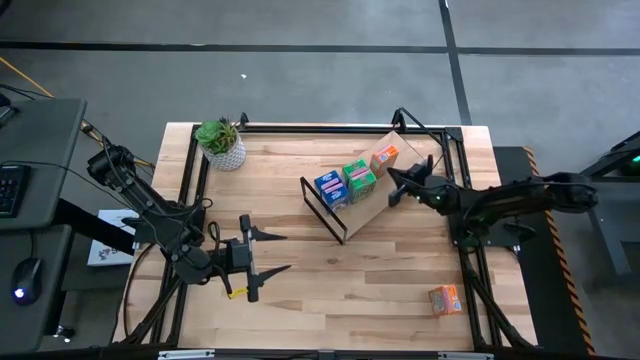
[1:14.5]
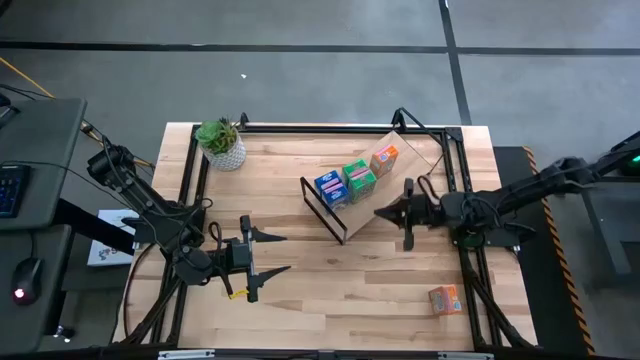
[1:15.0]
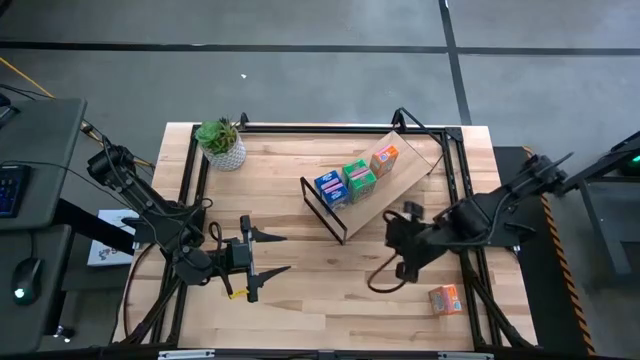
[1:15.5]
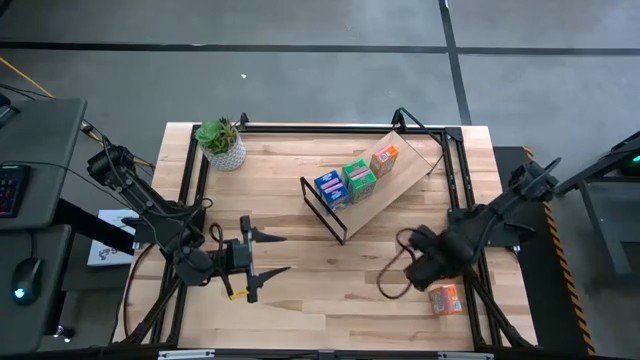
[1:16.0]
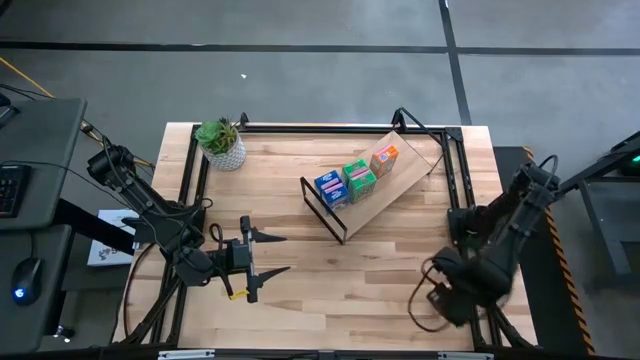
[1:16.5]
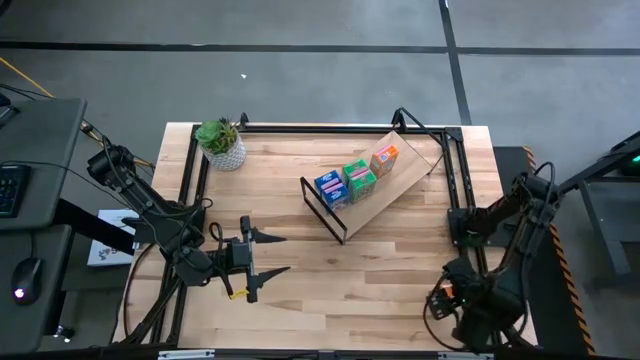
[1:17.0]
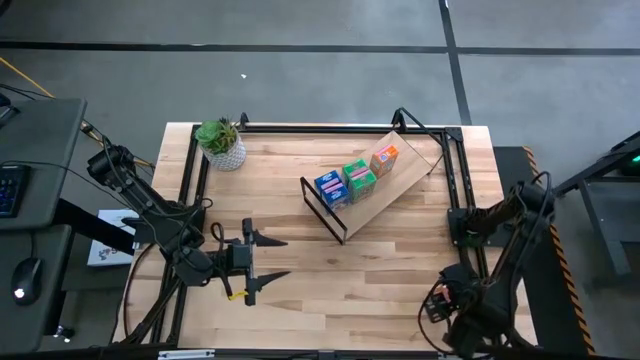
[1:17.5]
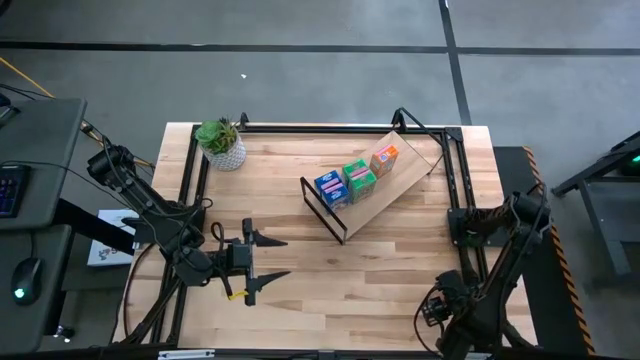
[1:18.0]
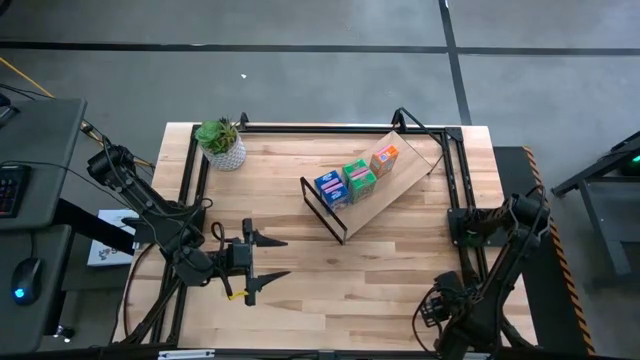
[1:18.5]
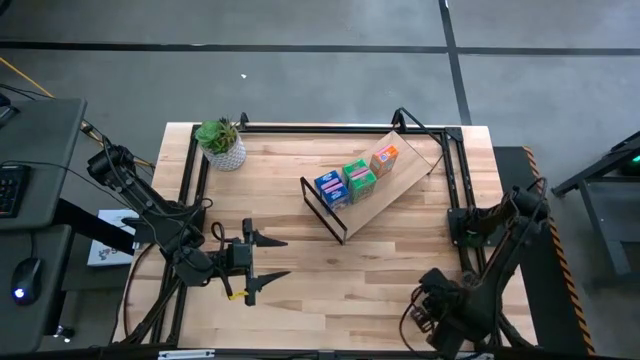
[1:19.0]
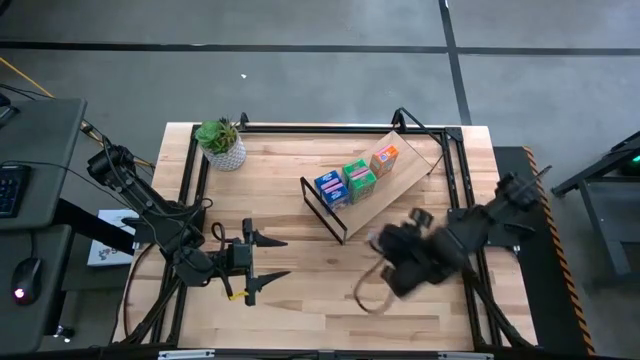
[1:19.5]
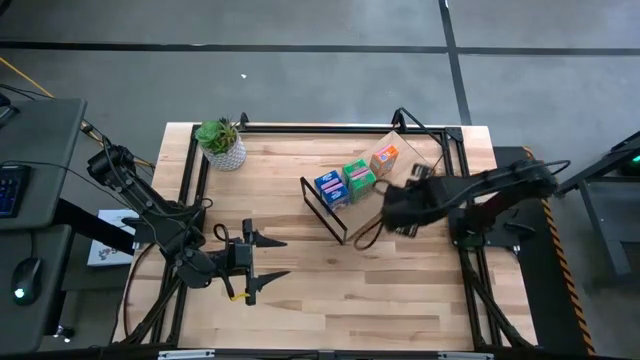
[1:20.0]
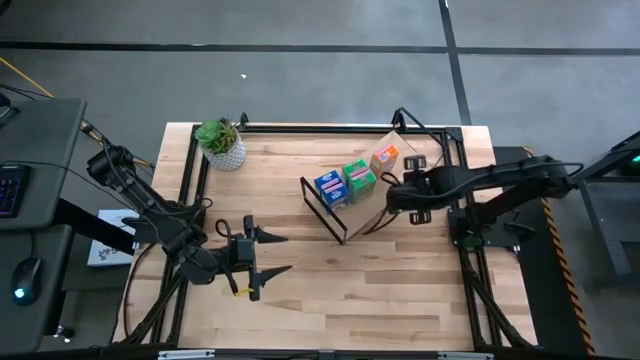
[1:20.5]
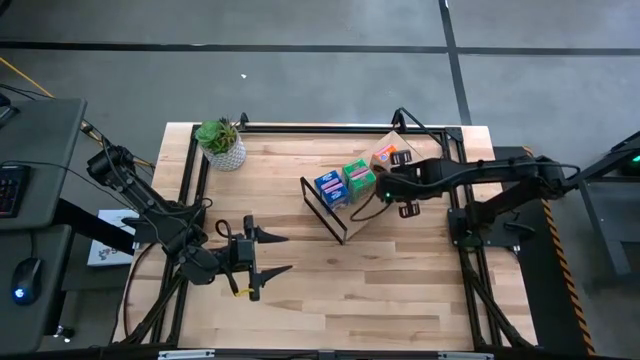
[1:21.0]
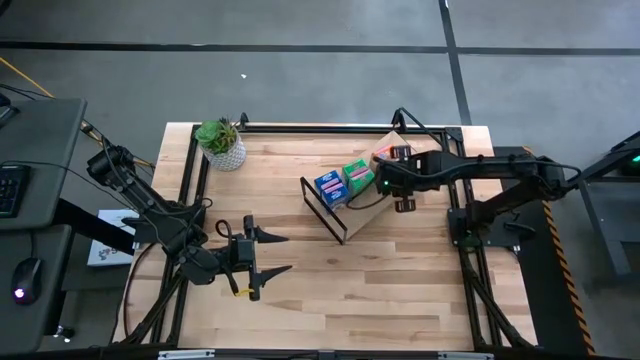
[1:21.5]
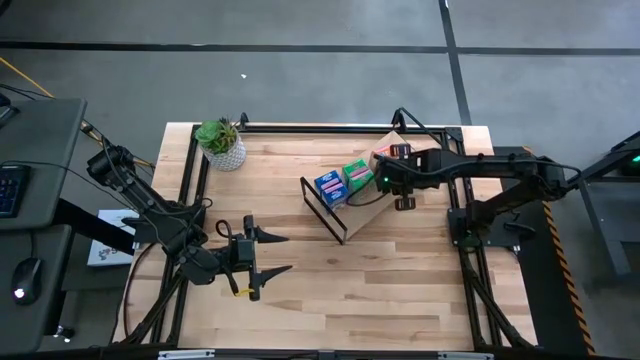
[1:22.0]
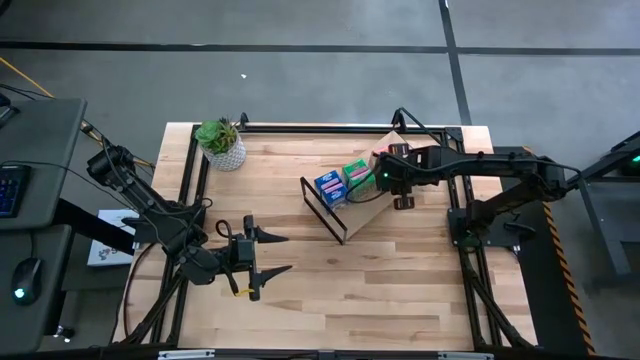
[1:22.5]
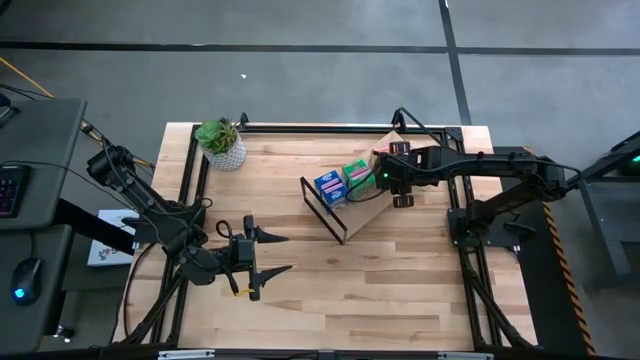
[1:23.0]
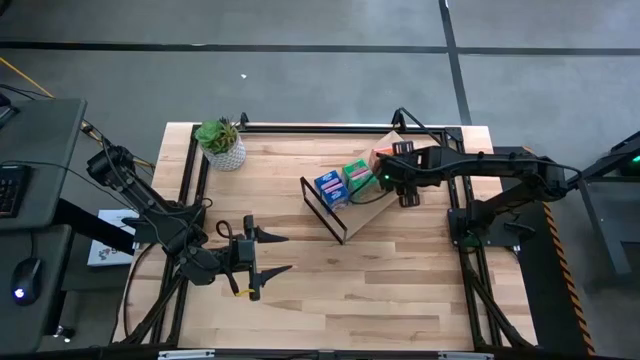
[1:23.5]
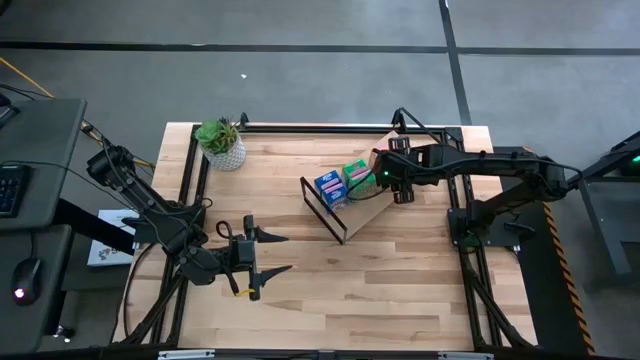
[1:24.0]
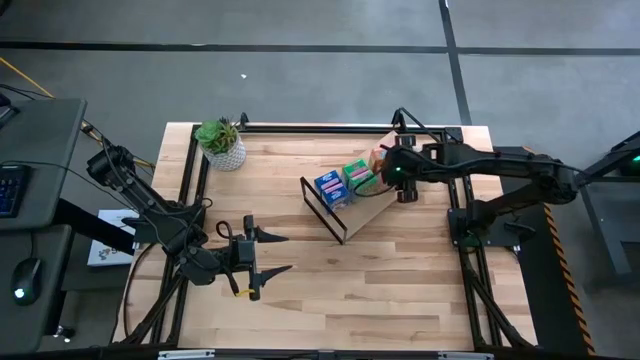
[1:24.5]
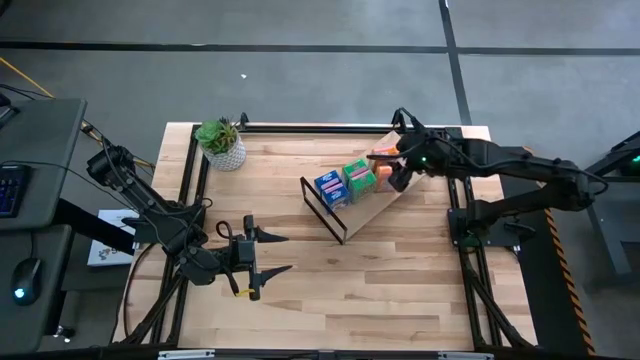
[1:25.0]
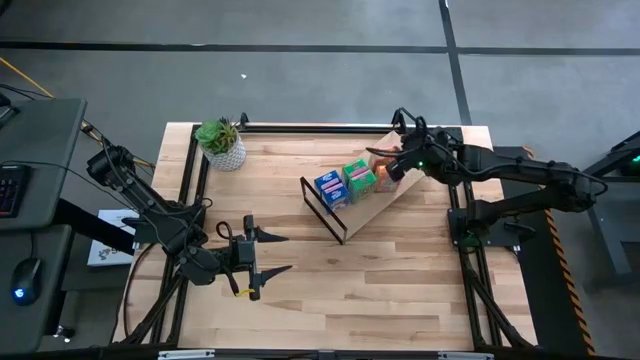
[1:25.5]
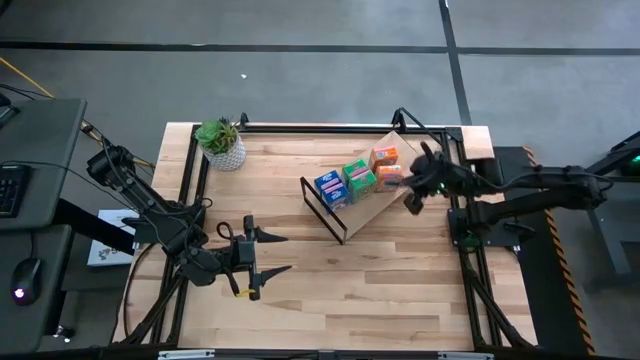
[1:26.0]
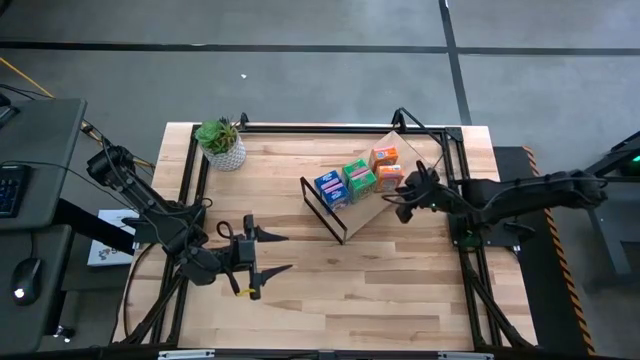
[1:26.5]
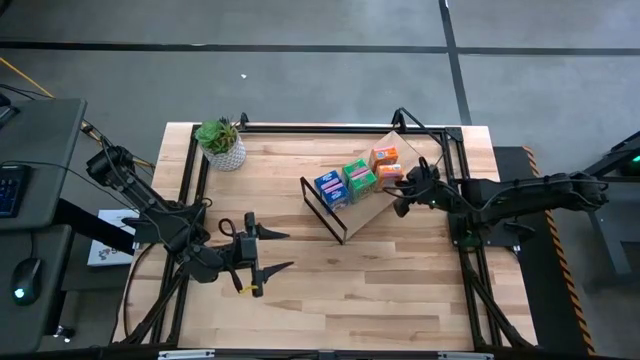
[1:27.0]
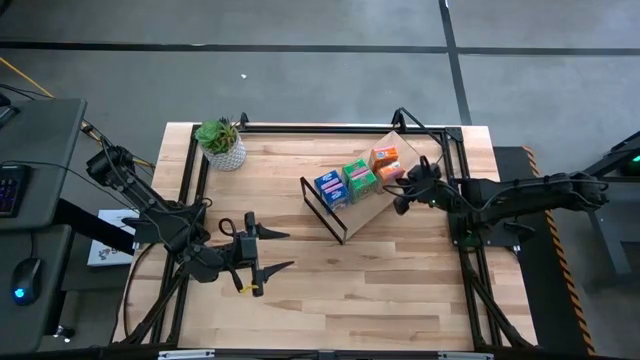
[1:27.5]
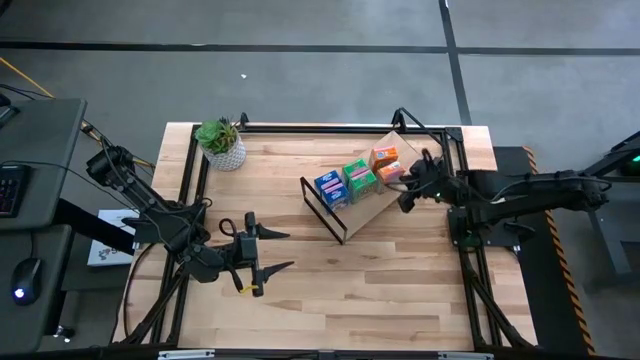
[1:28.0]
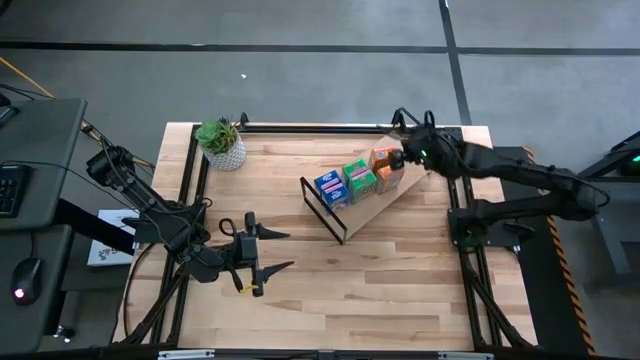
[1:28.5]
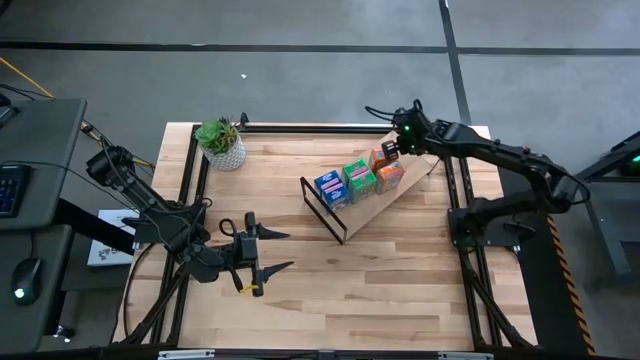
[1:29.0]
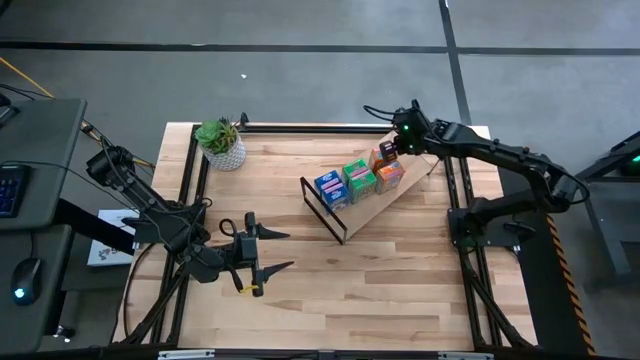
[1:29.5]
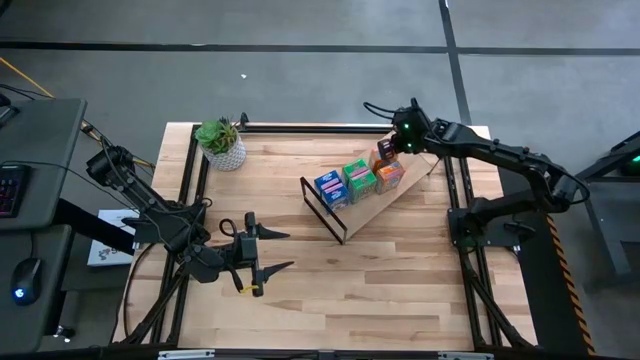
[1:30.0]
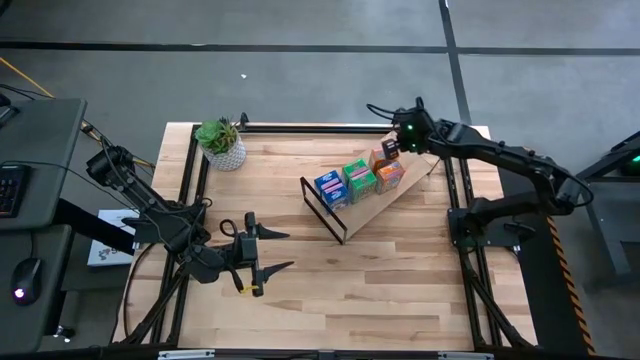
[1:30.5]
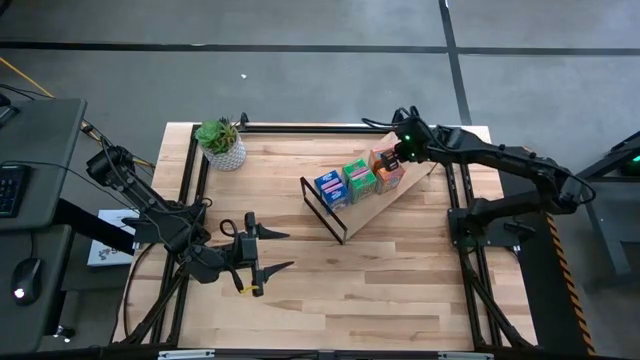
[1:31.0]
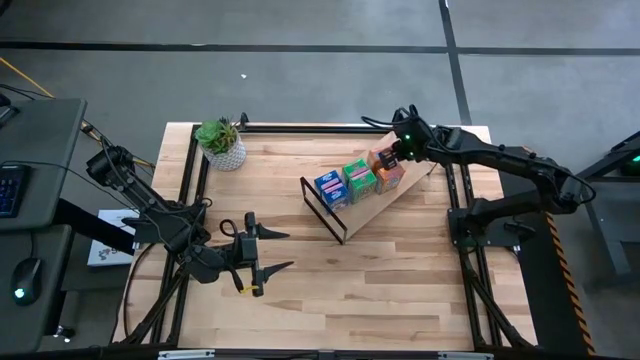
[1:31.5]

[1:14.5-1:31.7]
Task: Stack cereal on shelf
Put the orange cereal box aligned with the other orange cereal box on the shelf

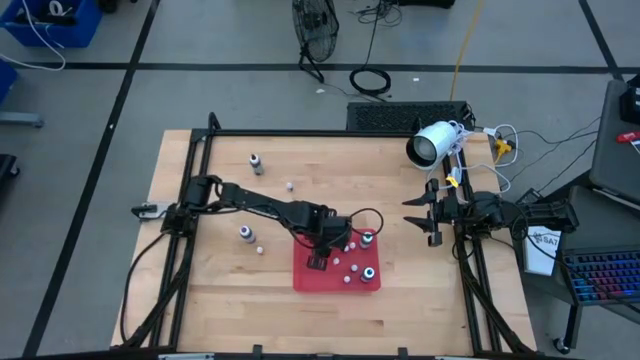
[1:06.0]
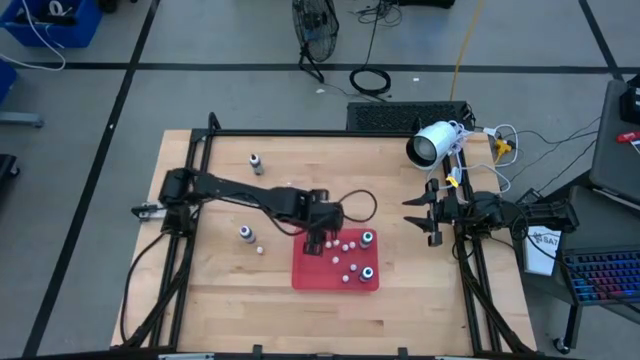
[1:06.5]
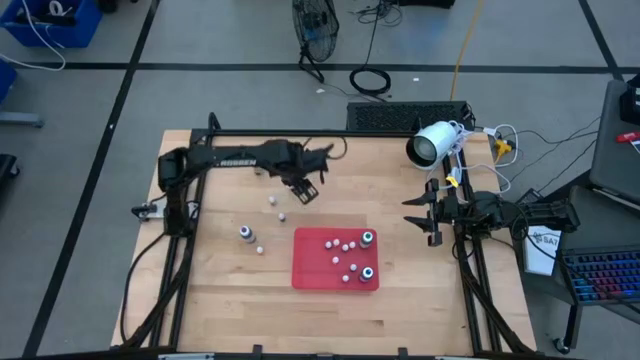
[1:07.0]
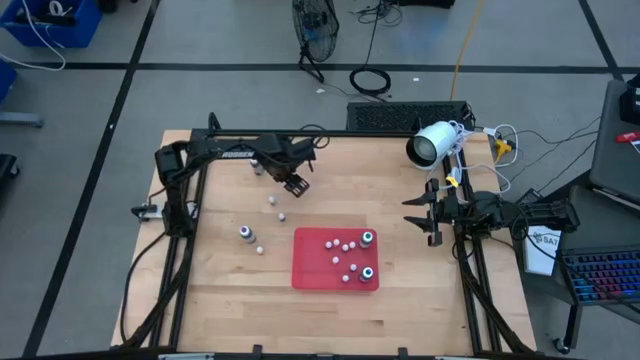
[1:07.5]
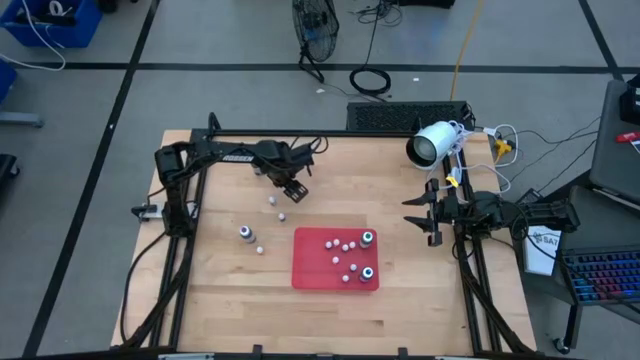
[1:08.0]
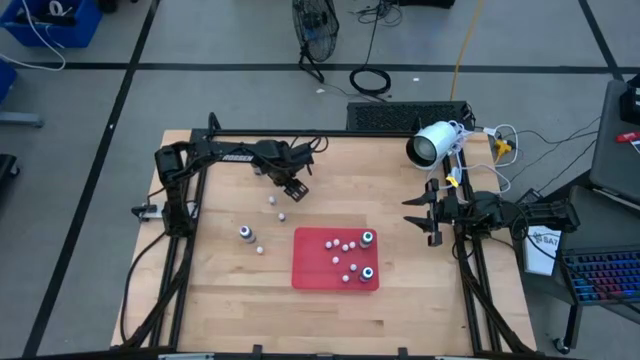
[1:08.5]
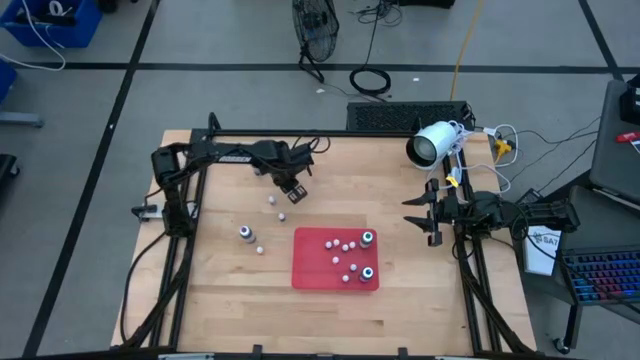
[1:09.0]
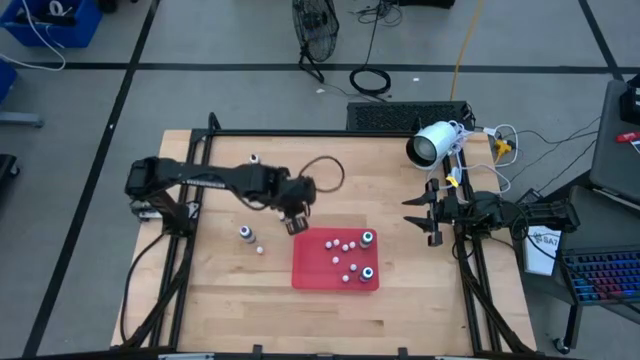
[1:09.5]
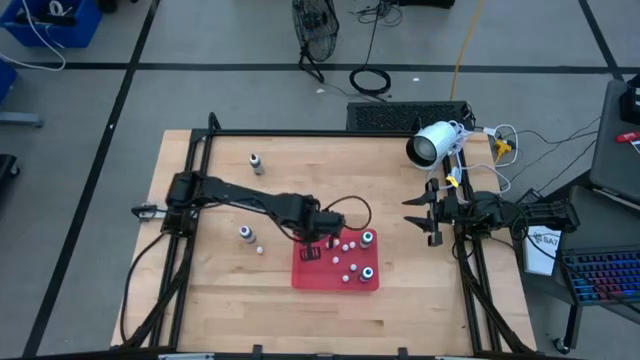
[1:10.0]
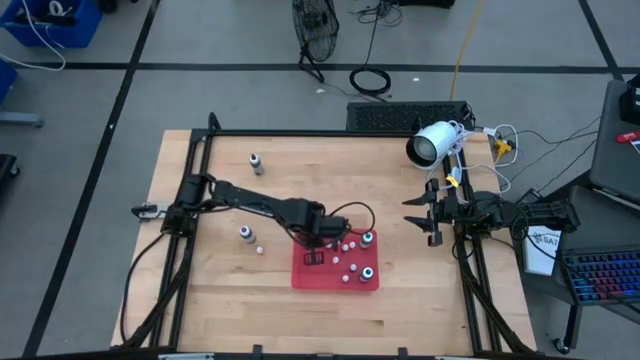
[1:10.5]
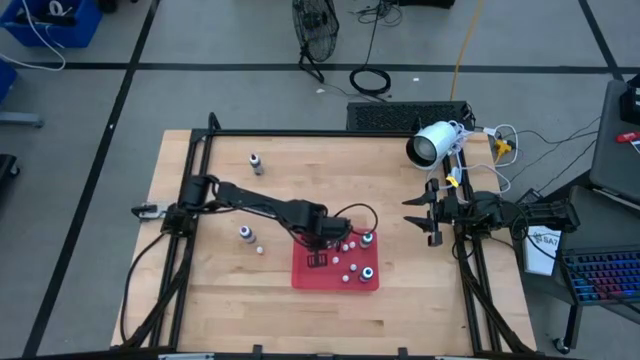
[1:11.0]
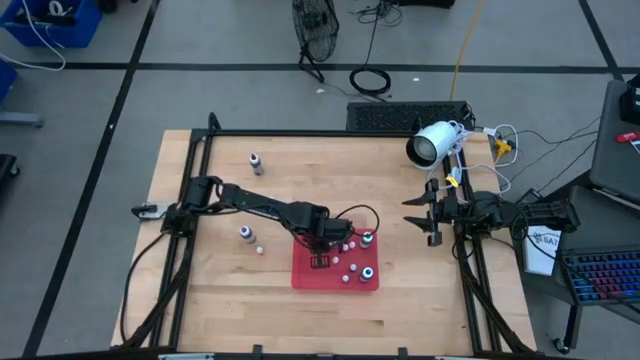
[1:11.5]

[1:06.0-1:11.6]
Task: Pick & Place food coloring
Put the small black food coloring bottle into the red bin
